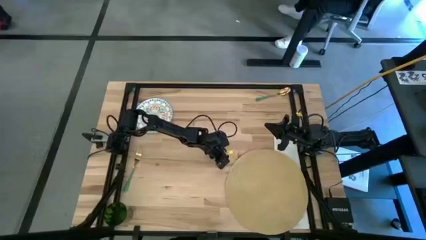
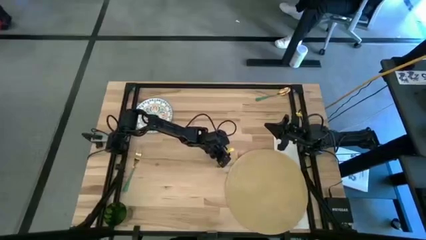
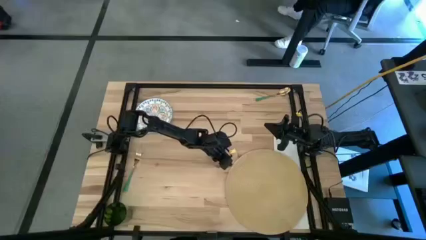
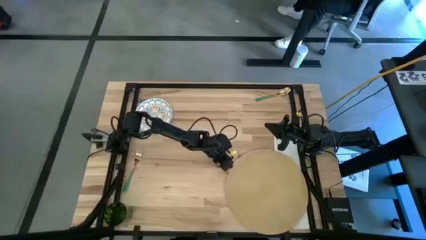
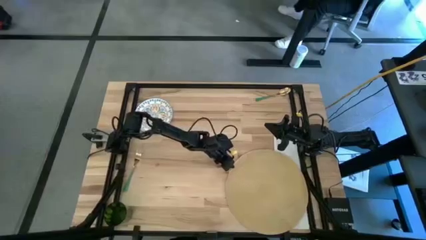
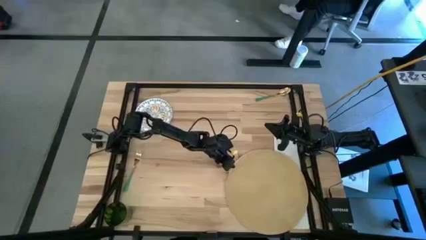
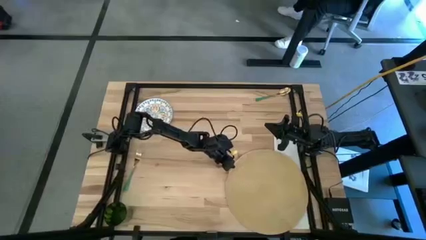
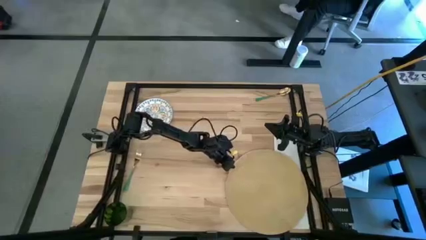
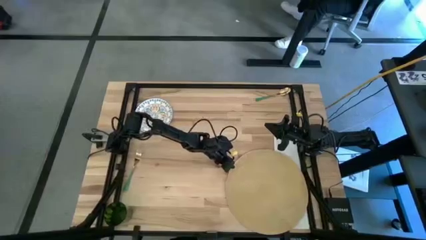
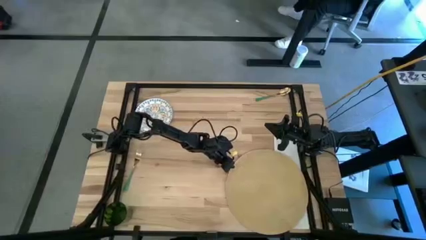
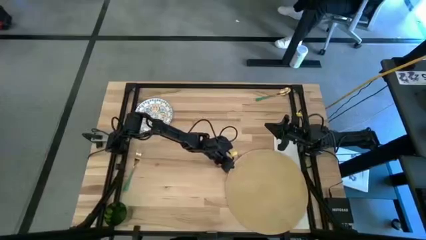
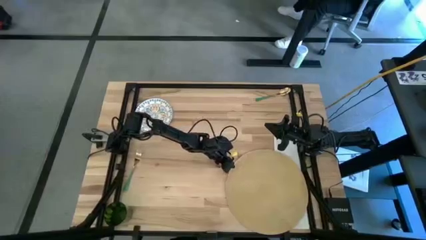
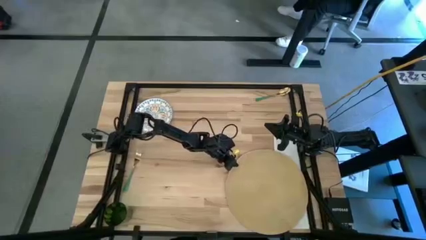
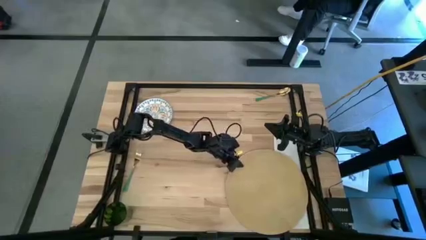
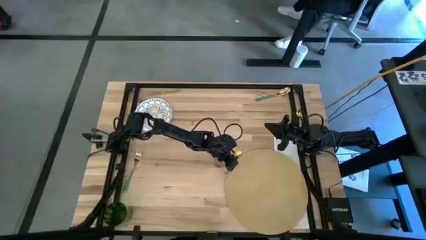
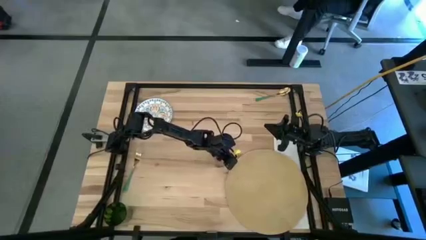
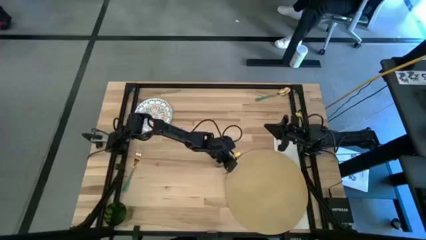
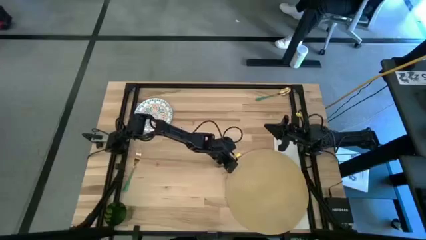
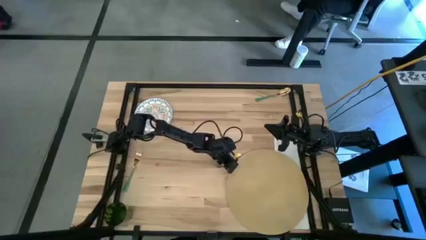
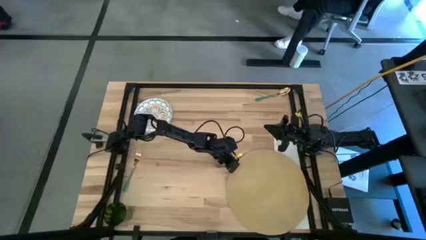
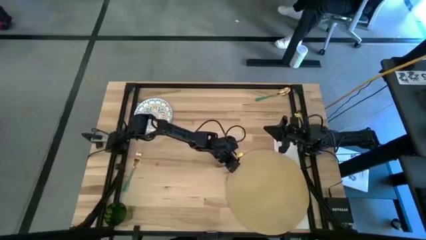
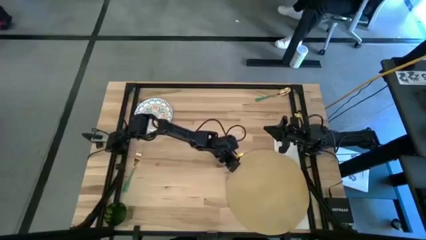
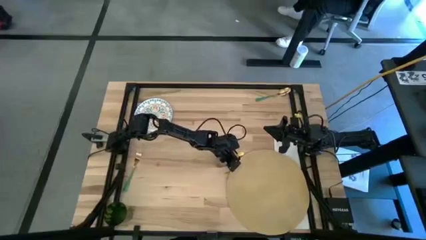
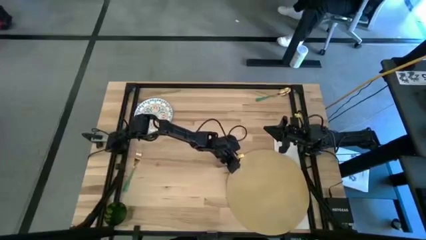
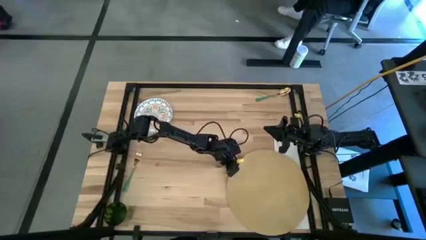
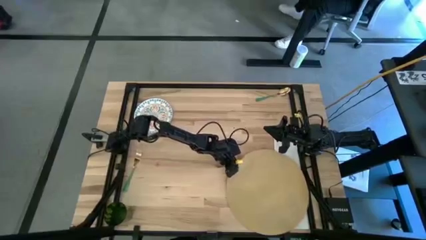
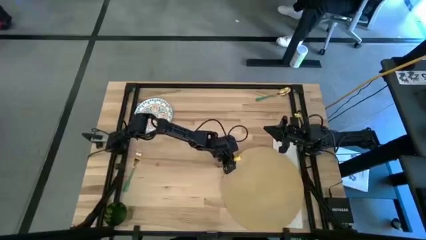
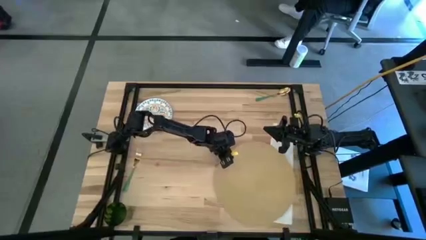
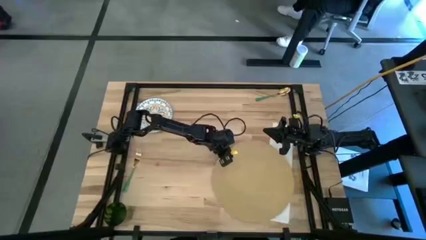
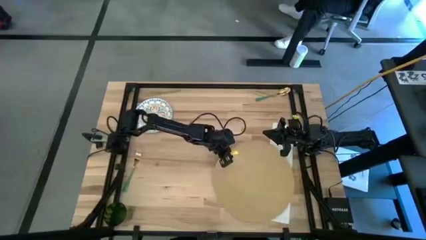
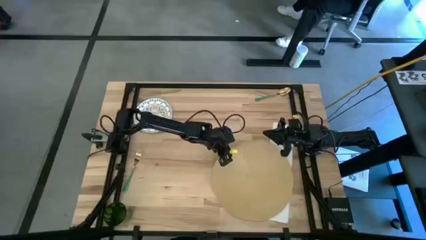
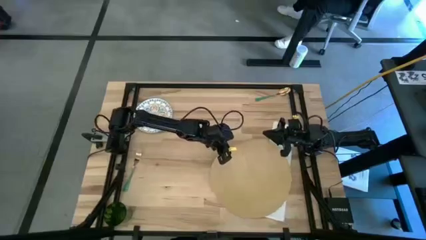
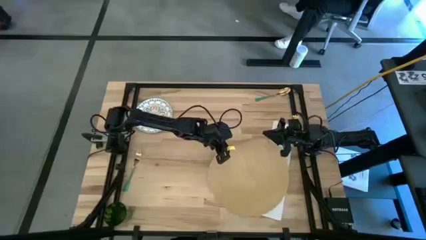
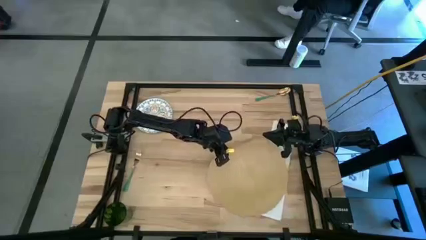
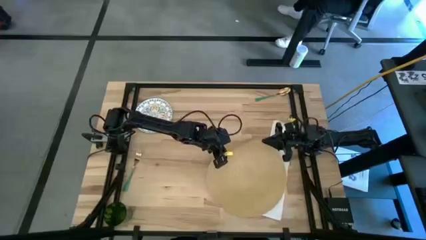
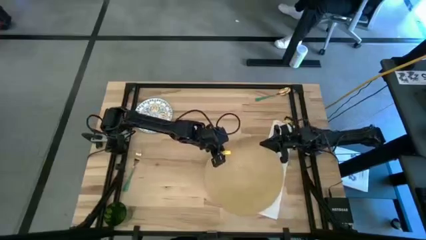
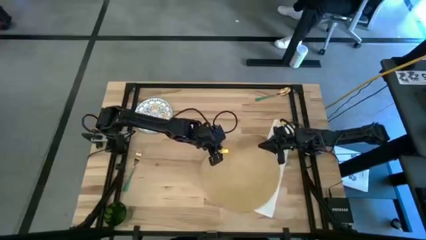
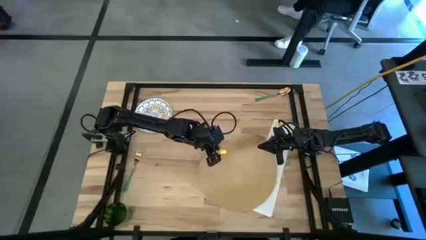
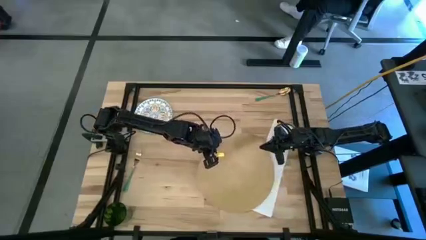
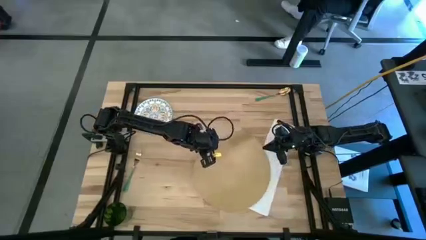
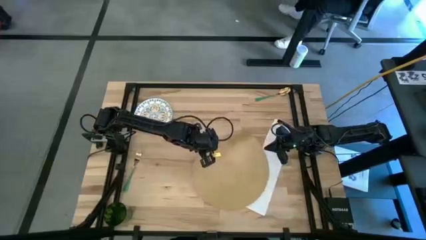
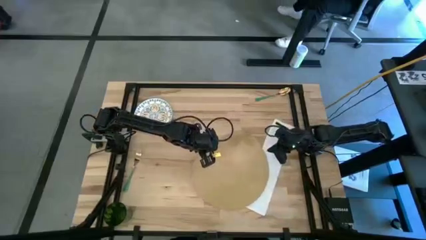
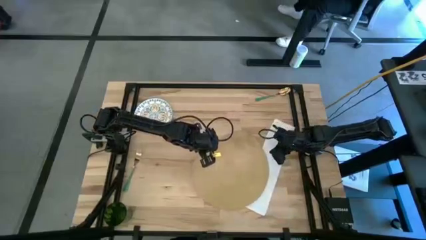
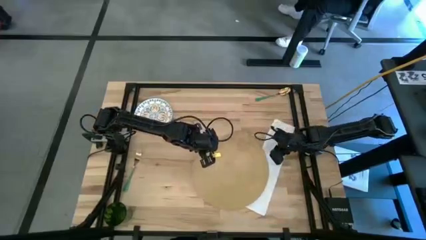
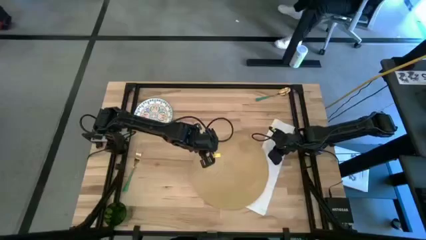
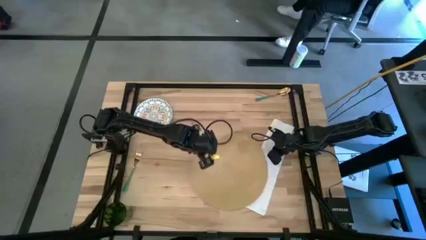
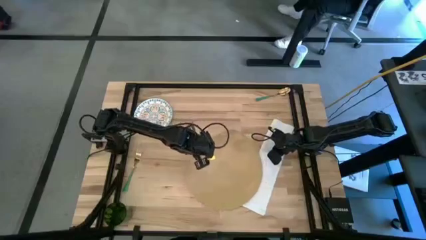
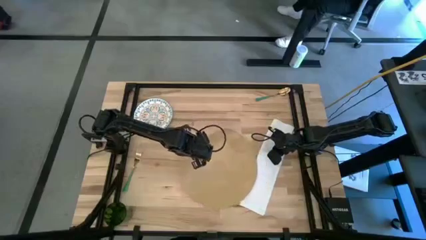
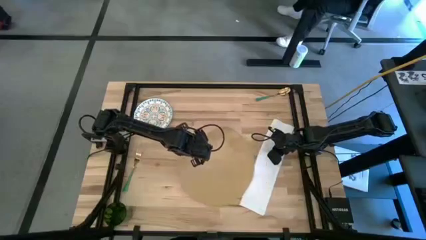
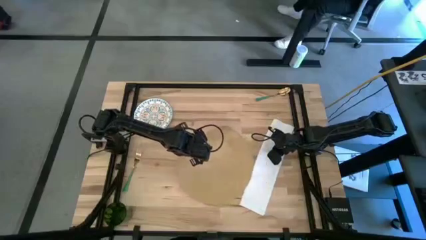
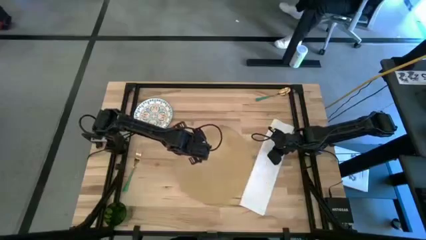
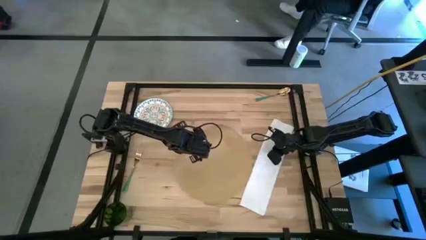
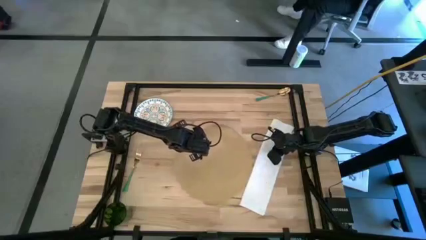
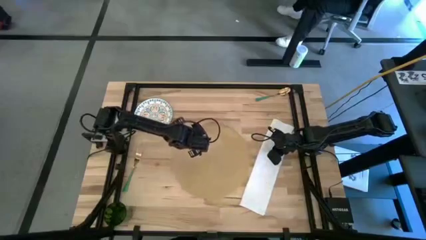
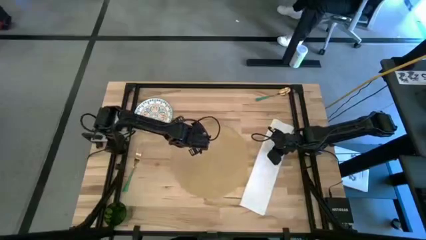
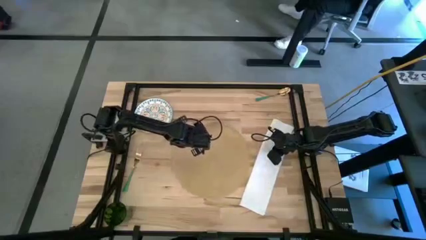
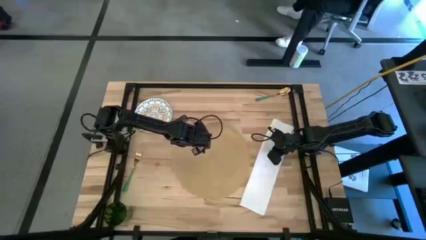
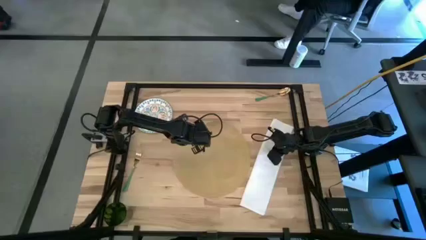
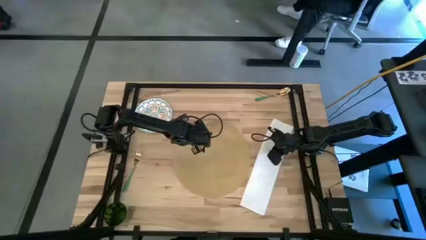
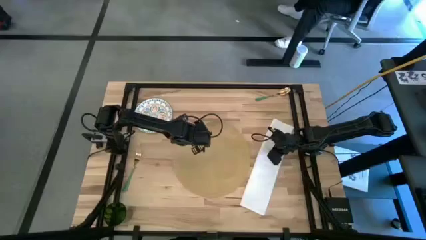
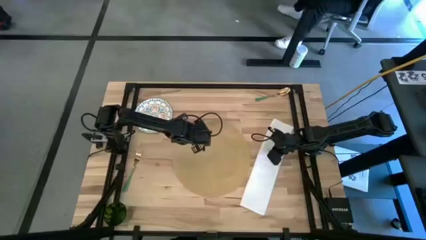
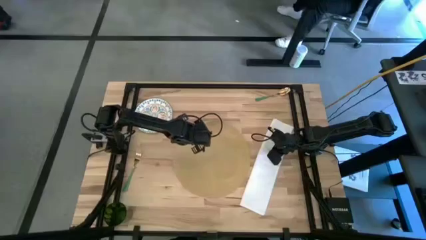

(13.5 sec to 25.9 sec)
Task: Set table place
Move the brown place mat to the center of the table
